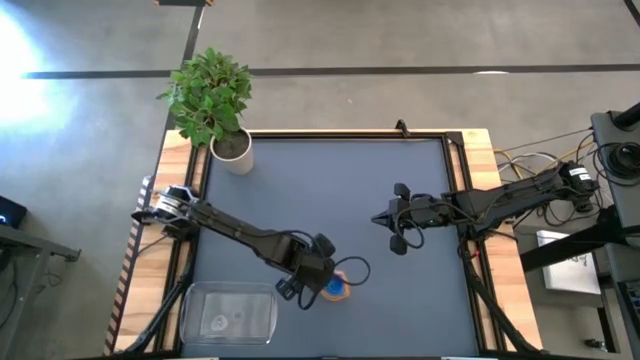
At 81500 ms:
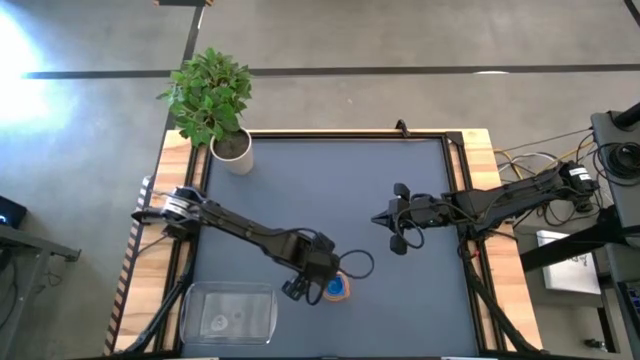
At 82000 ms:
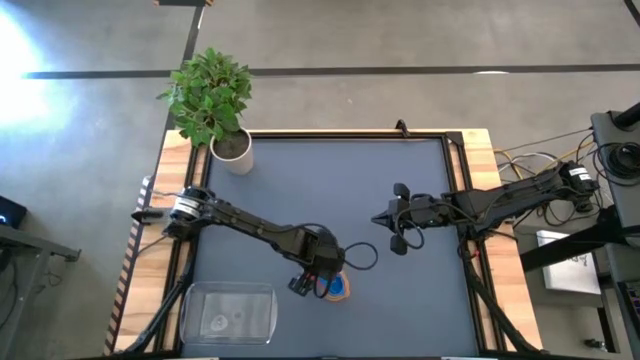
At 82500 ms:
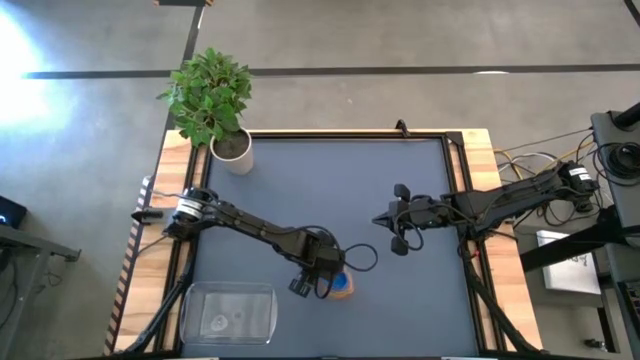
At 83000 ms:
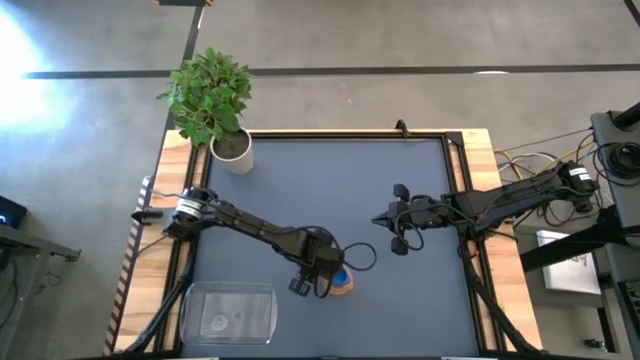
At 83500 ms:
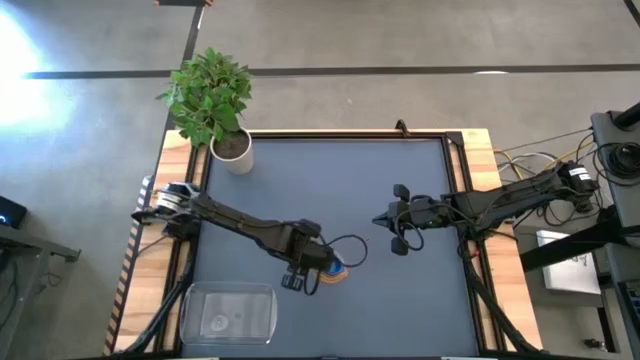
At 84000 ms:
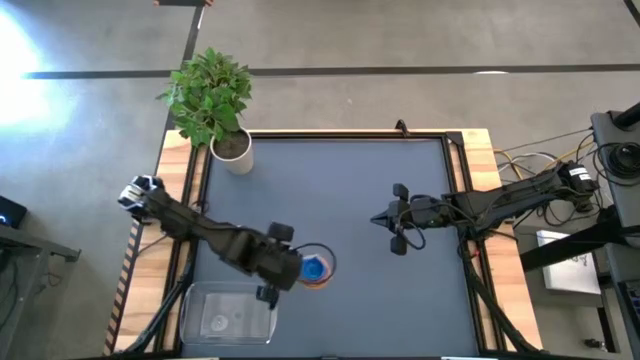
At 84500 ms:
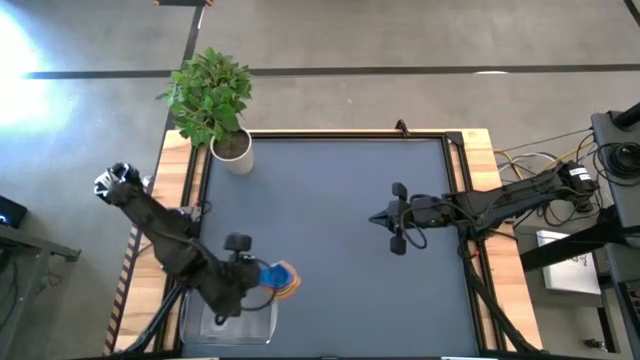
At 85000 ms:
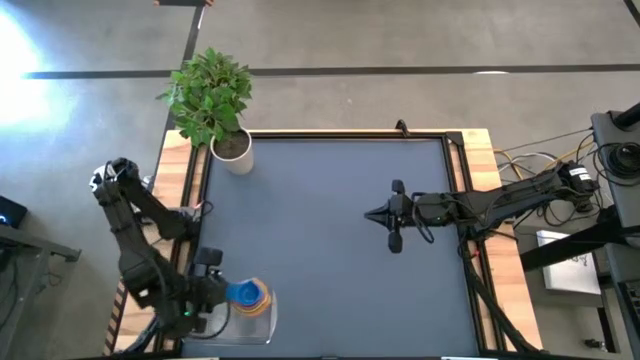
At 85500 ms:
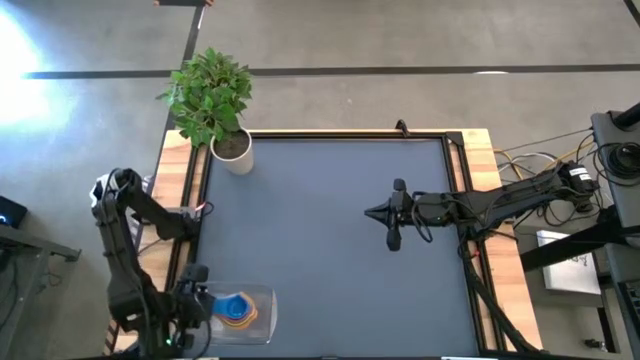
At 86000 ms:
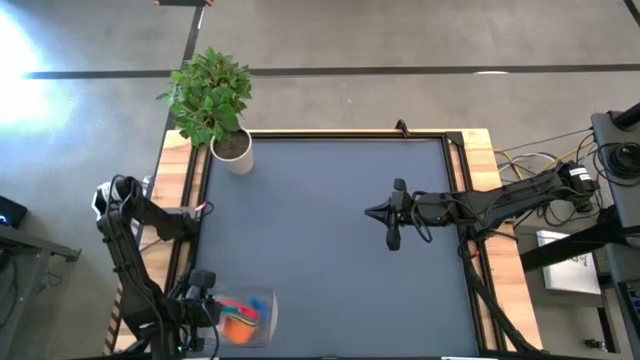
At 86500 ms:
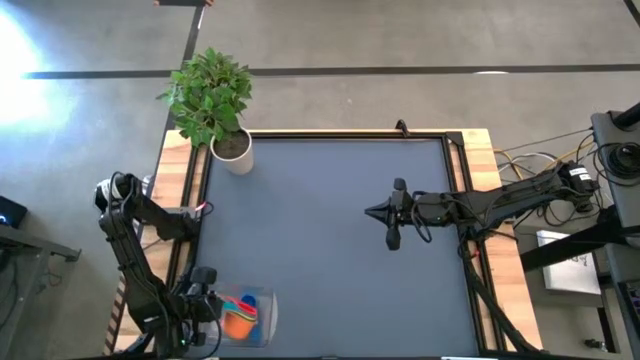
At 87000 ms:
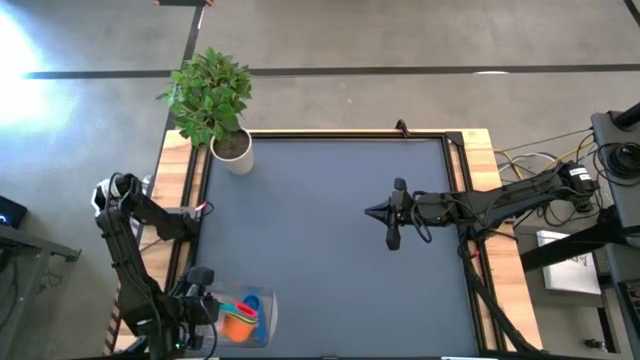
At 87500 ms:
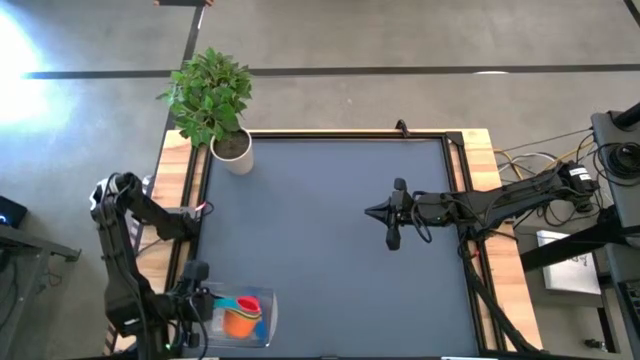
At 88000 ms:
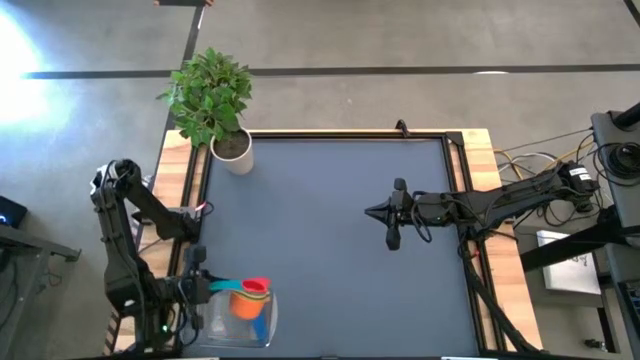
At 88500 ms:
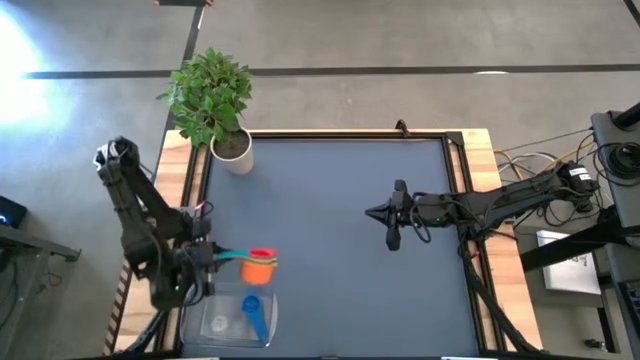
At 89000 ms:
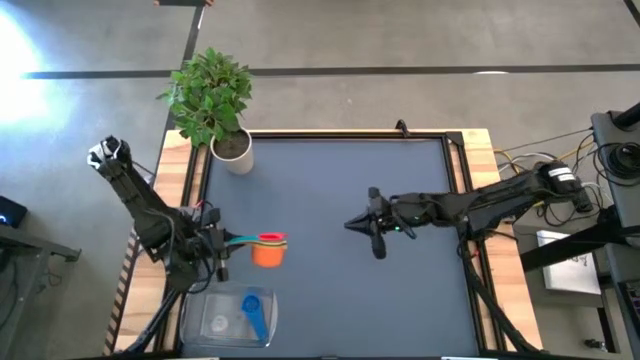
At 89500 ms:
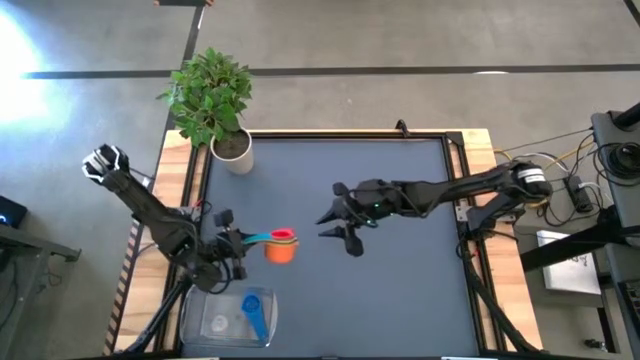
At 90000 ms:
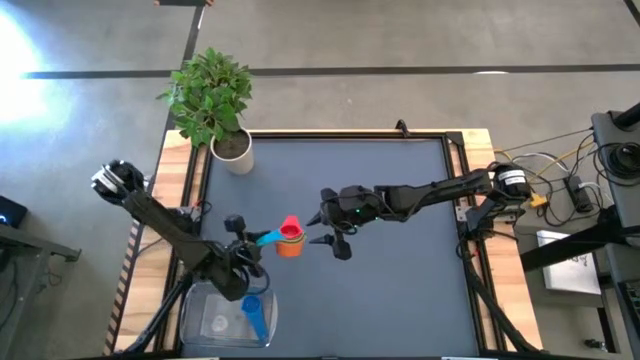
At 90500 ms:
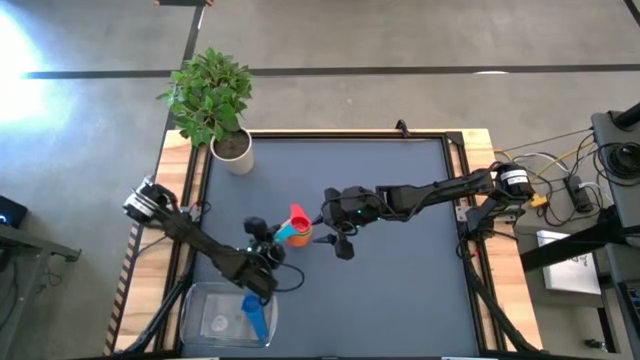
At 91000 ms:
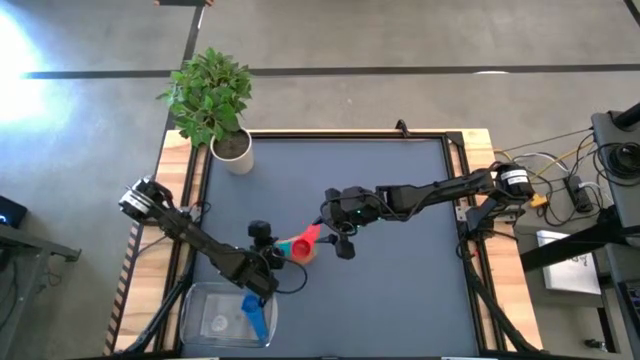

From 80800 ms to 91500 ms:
Task: Nest measuring cups in basket
Put the stacked measuring cups into the bin

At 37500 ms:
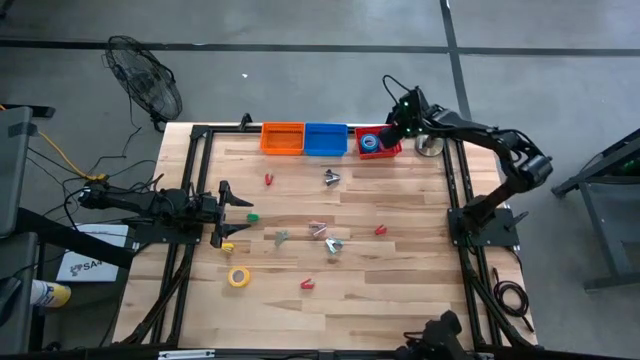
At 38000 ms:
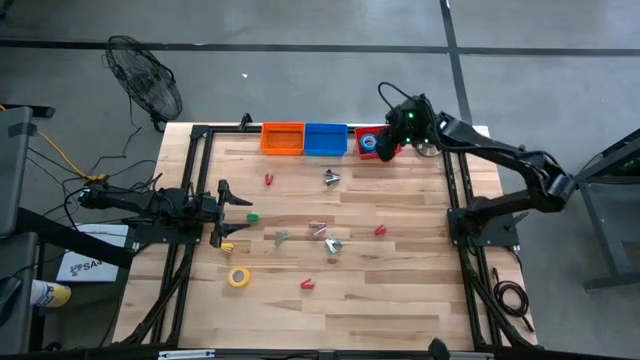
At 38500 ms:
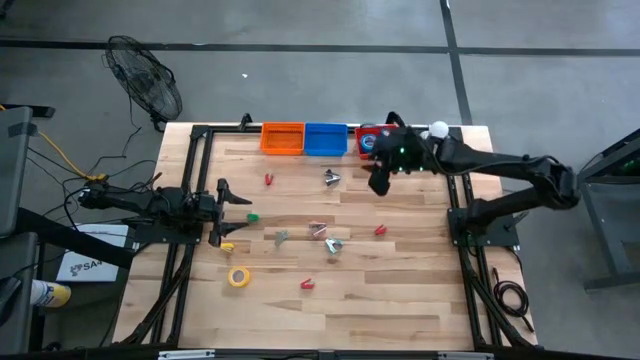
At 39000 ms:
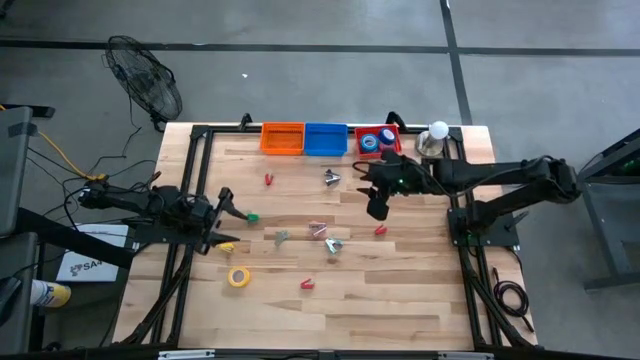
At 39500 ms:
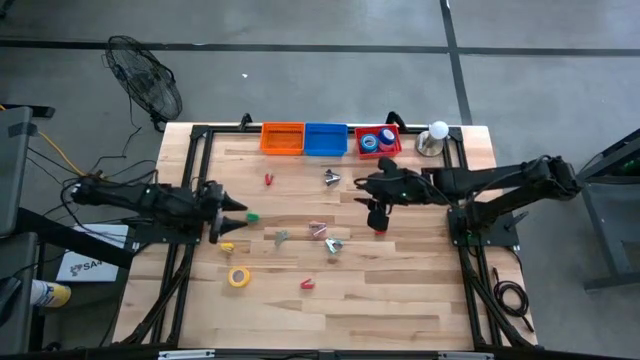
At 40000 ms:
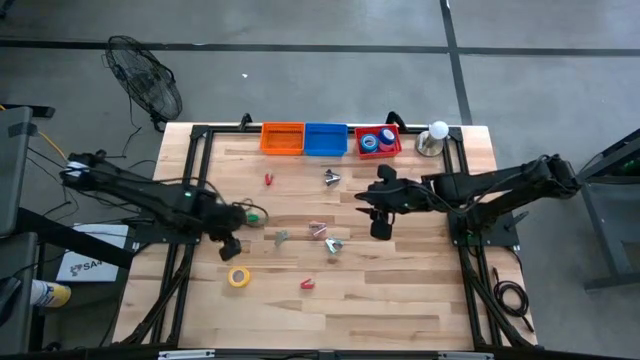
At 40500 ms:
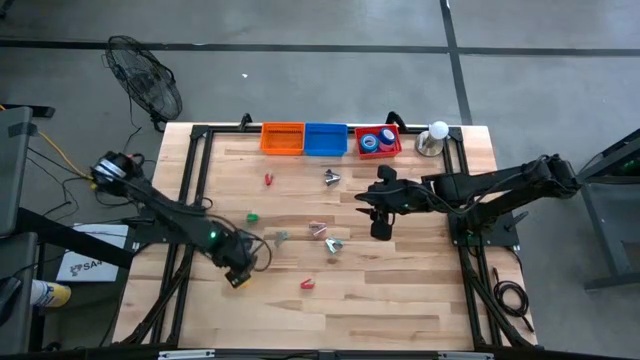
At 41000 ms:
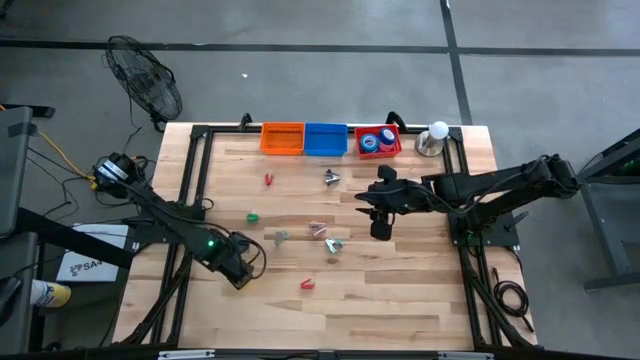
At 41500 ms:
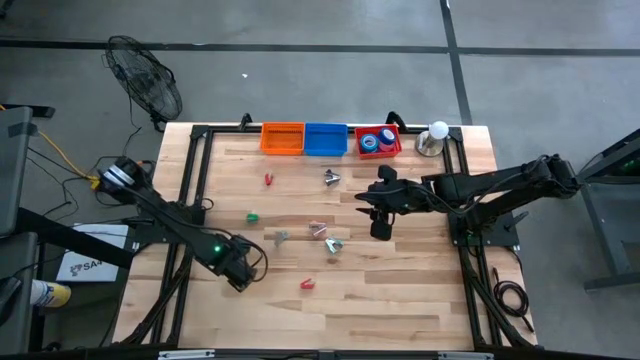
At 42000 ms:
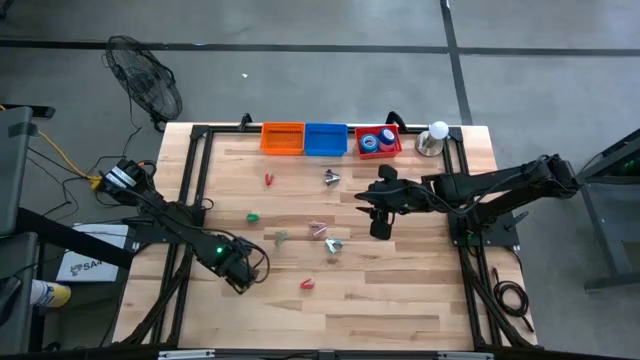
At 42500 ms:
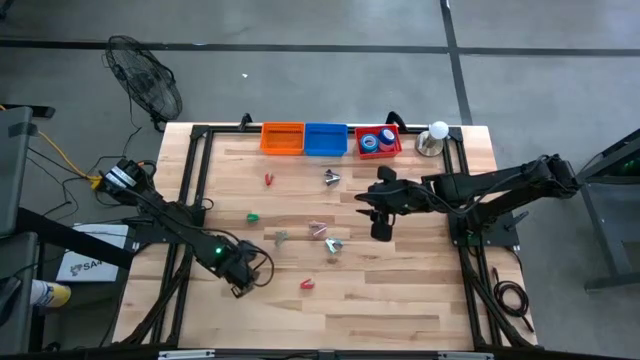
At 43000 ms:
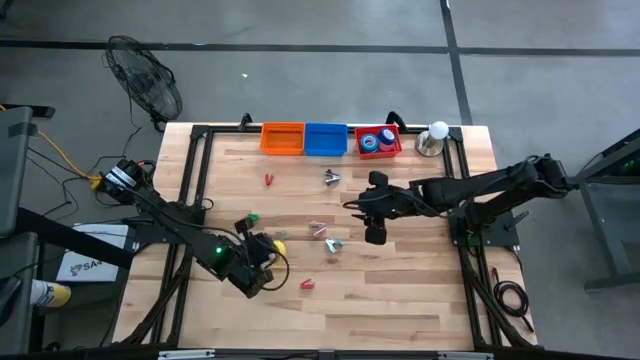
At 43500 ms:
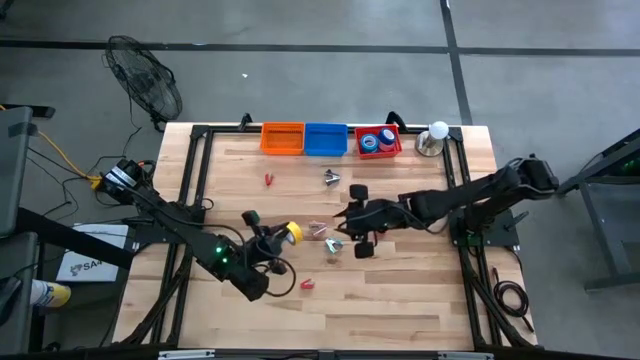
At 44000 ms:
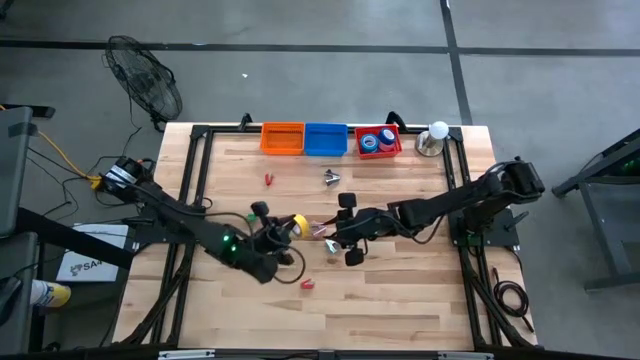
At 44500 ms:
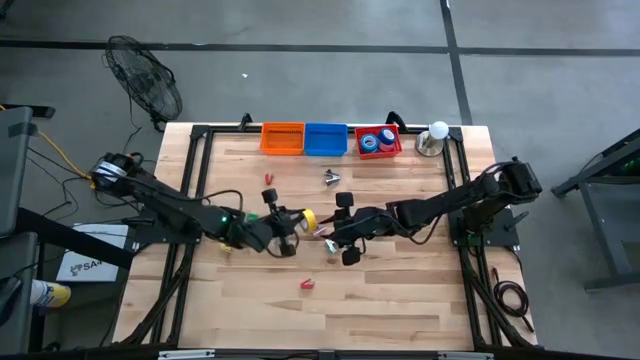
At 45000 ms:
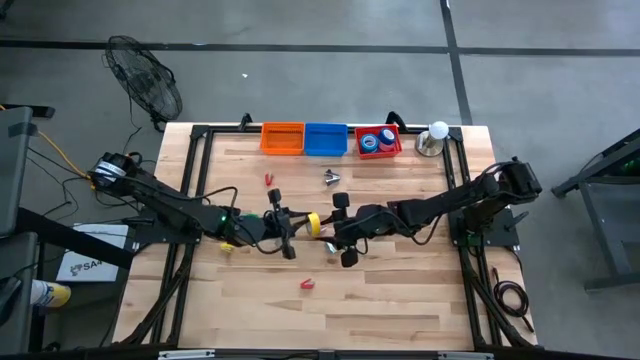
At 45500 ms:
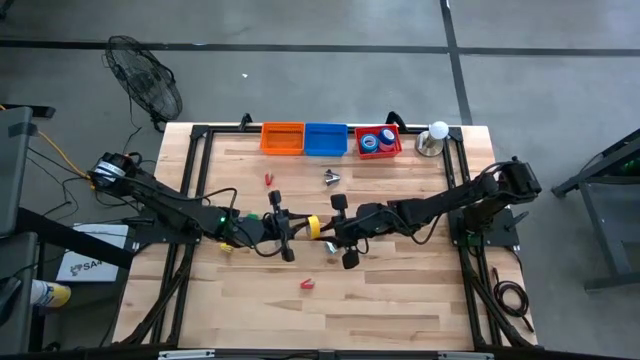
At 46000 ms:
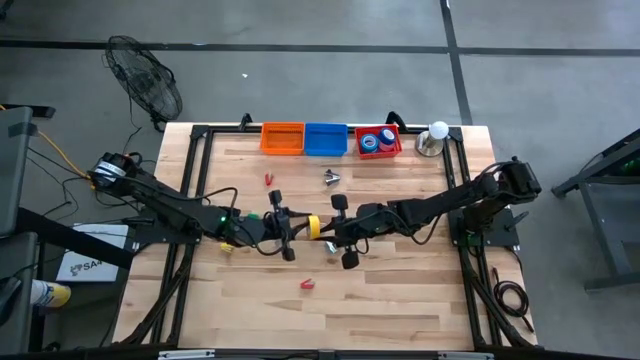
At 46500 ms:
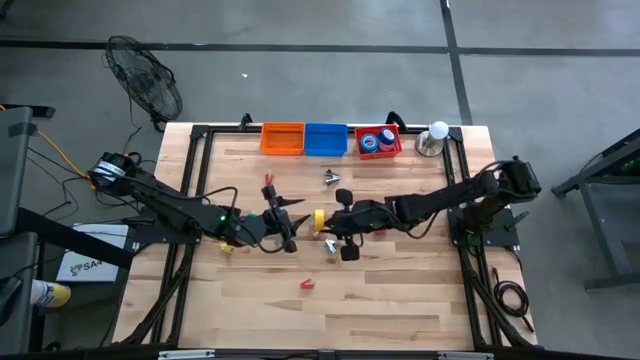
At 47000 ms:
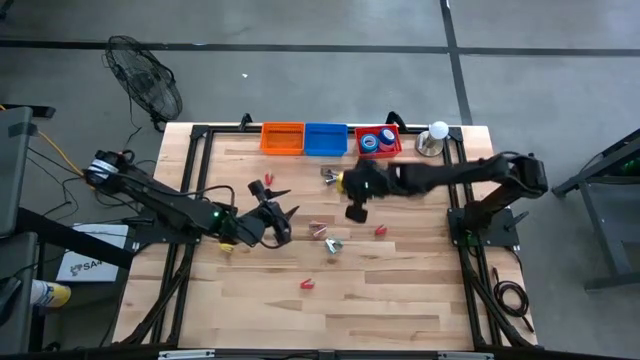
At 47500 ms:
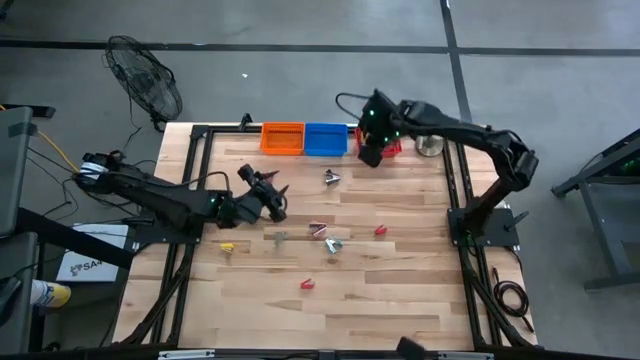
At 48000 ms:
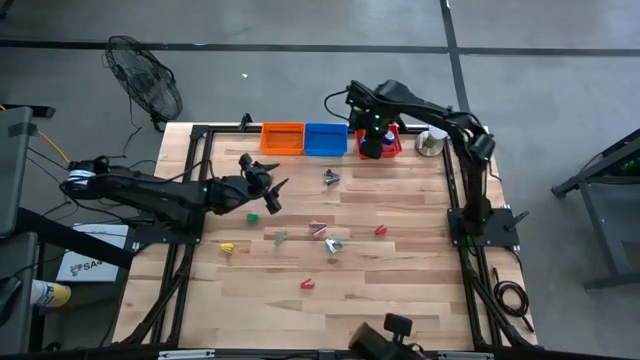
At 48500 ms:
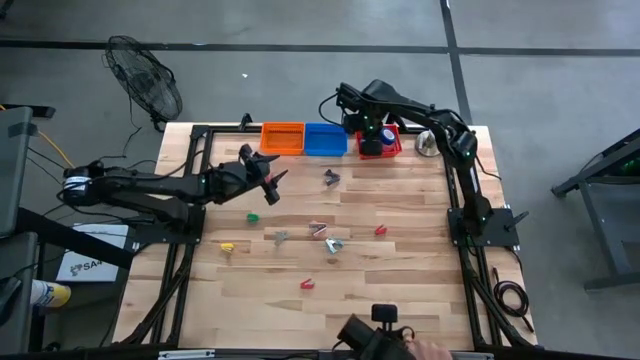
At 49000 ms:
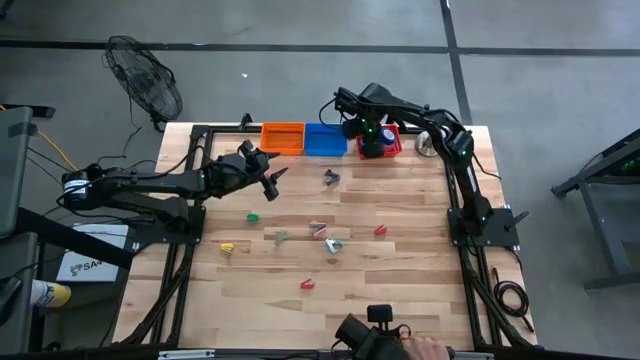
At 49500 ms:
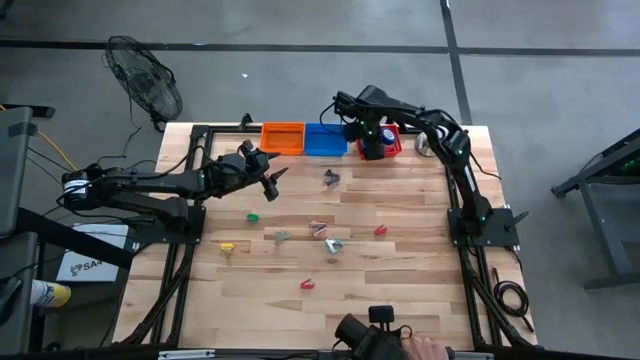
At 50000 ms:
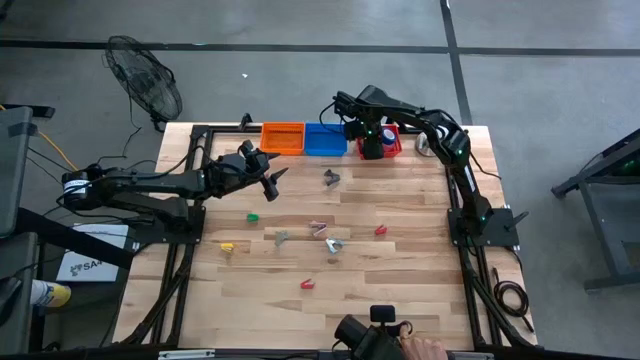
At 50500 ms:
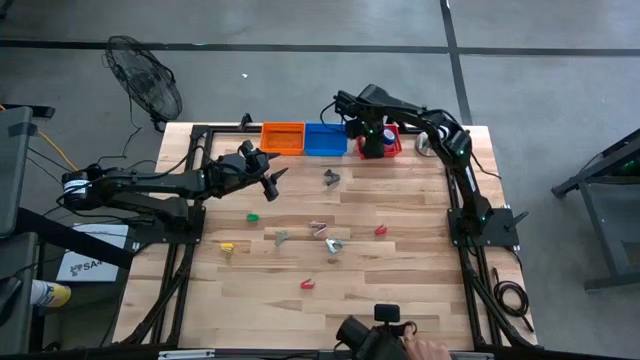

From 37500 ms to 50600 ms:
Task: Pick and place Stapler, Stapler remover, tape
Put the yellow tape into the red bin
